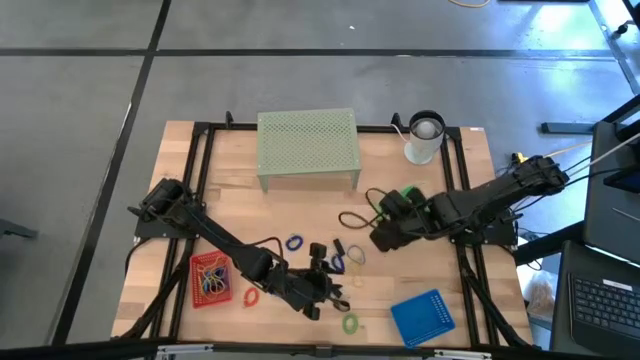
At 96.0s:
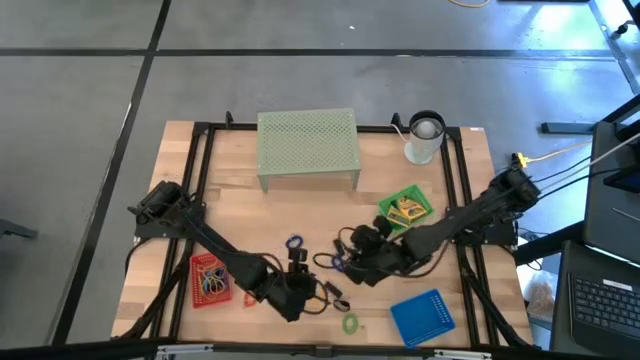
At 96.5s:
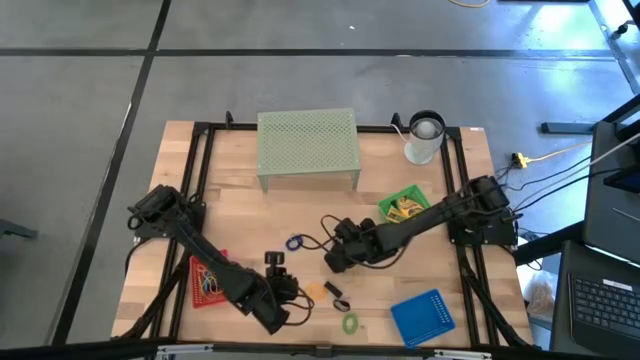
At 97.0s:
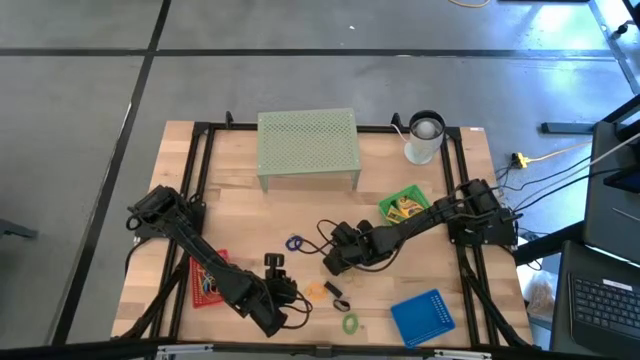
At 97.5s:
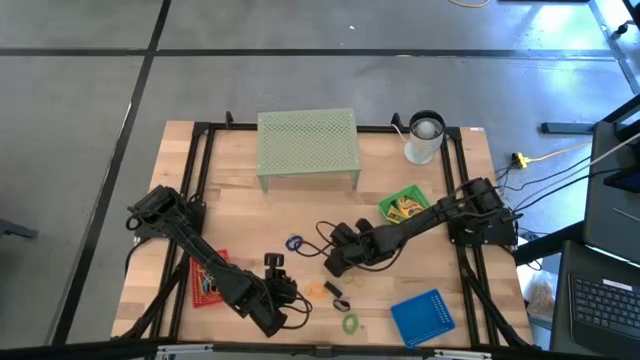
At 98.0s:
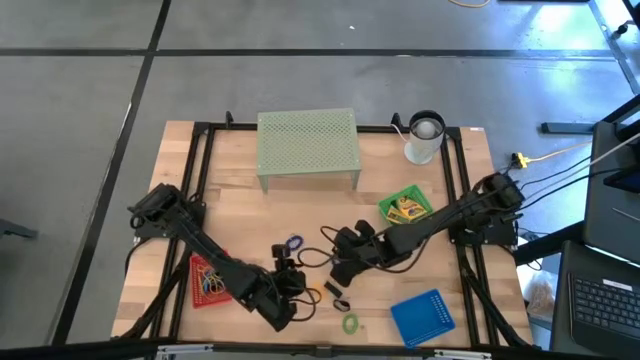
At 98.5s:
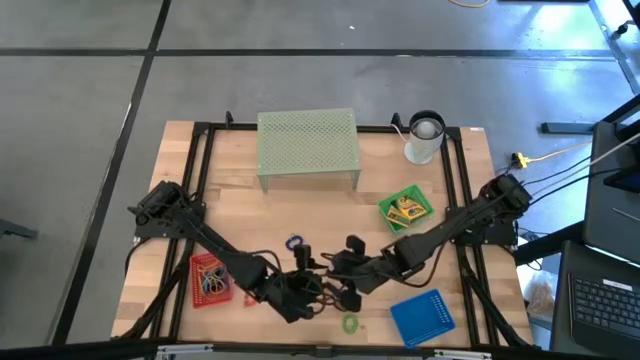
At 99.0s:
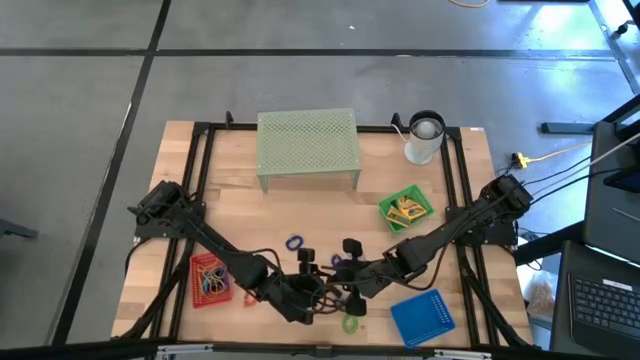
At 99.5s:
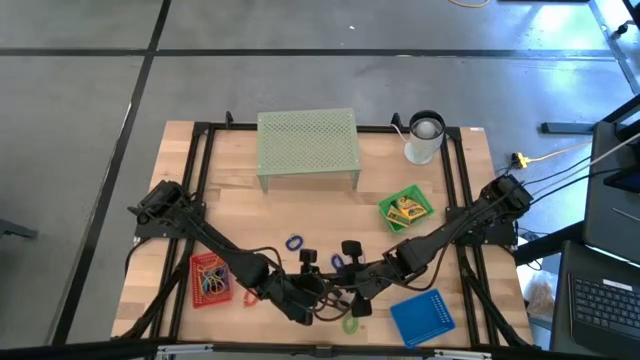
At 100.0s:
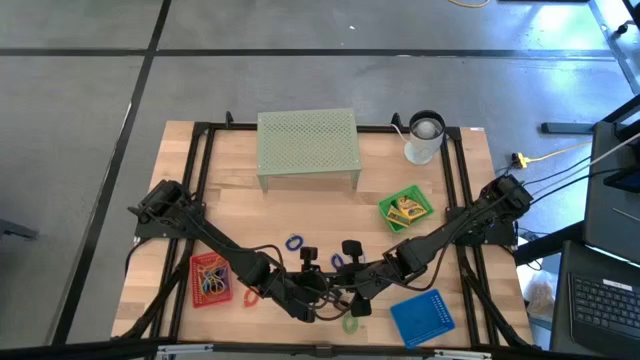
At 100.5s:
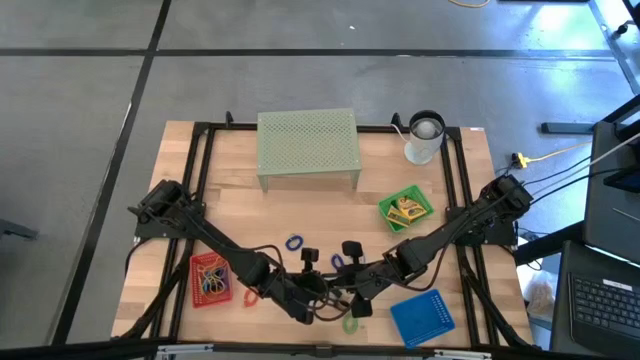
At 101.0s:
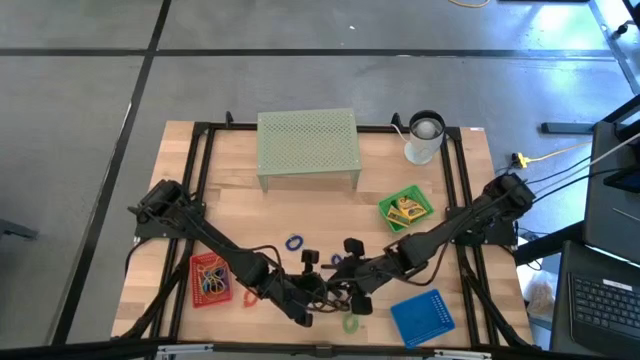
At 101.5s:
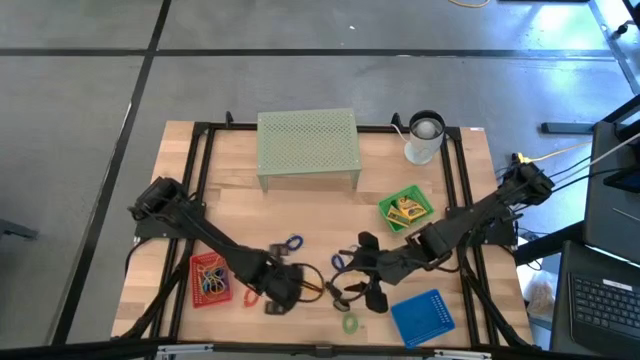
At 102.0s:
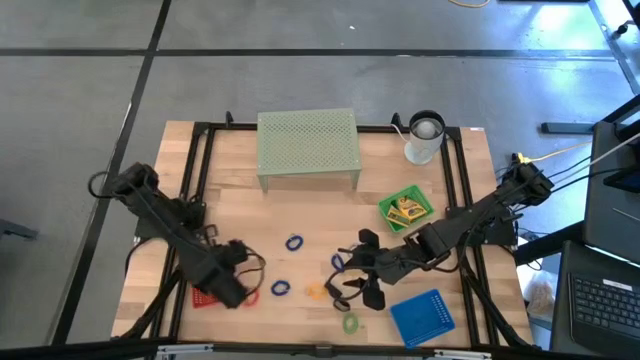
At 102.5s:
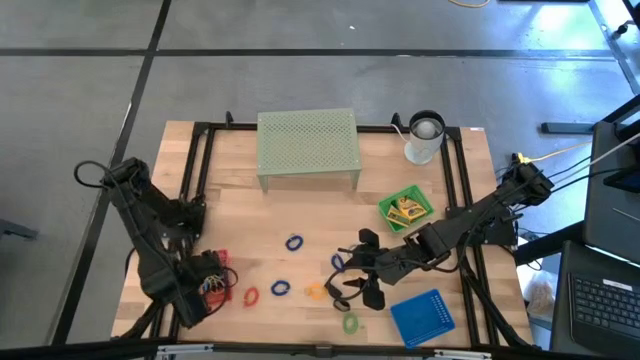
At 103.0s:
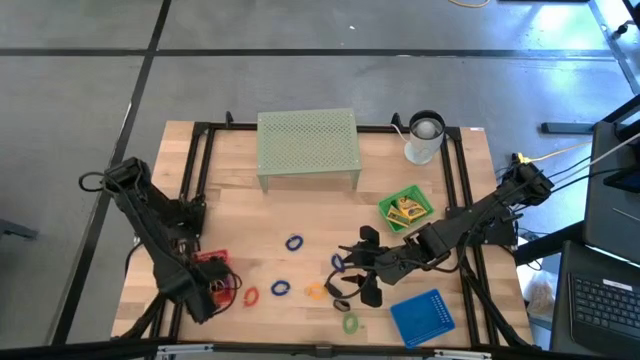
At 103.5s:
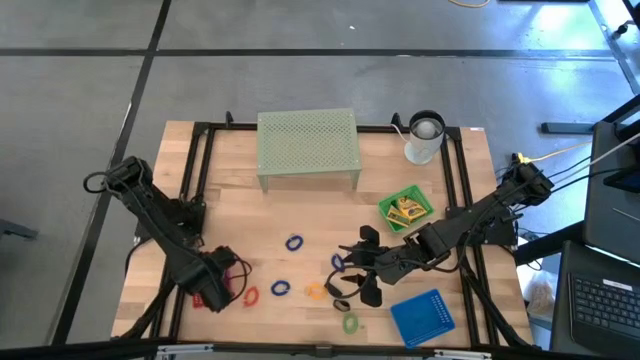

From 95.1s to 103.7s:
Task: Pick & Place Office Desk Supplies
Put the black rubber band into the red bin

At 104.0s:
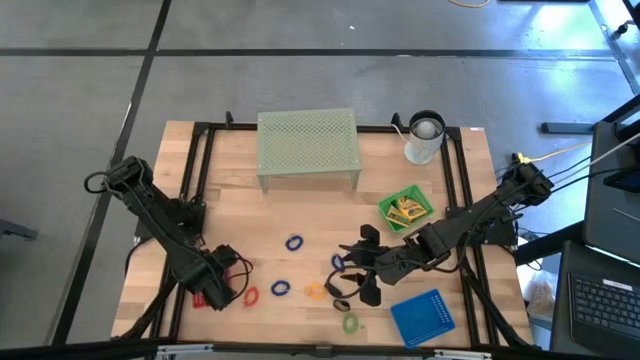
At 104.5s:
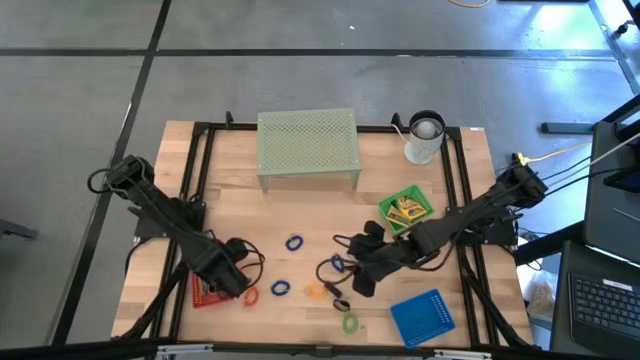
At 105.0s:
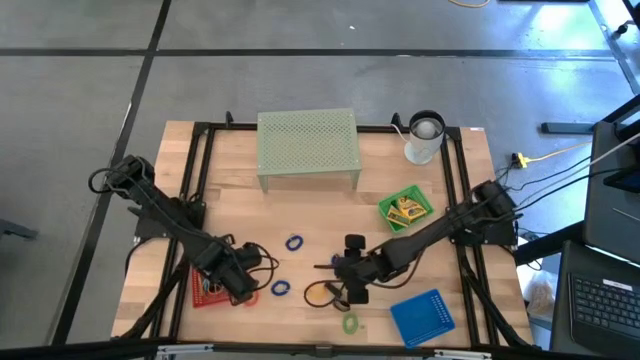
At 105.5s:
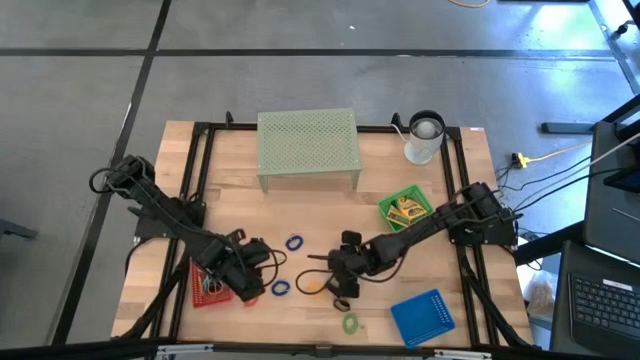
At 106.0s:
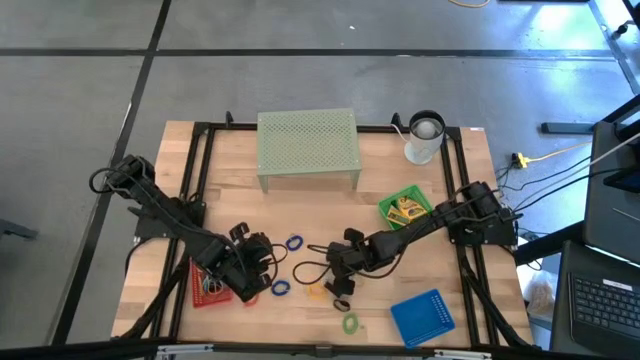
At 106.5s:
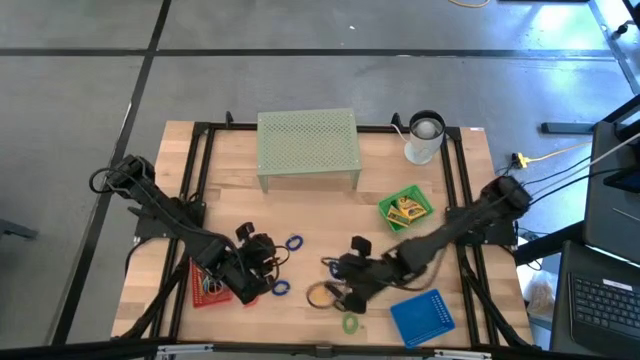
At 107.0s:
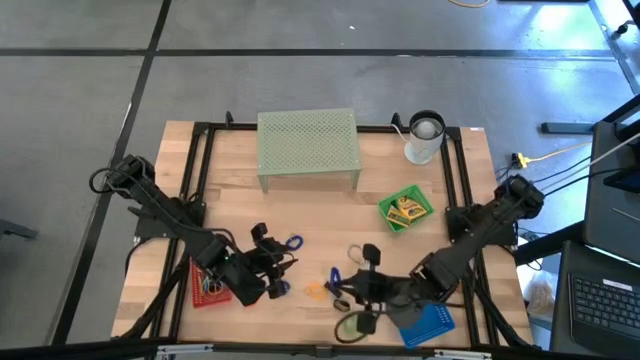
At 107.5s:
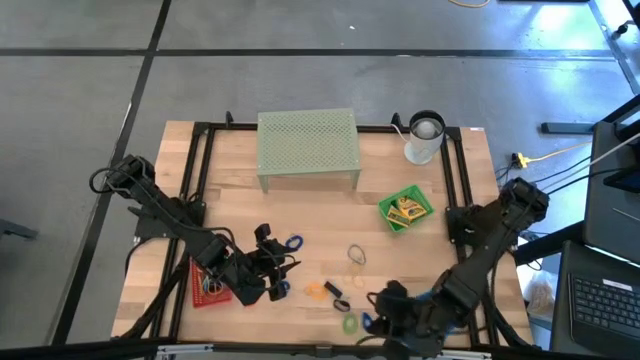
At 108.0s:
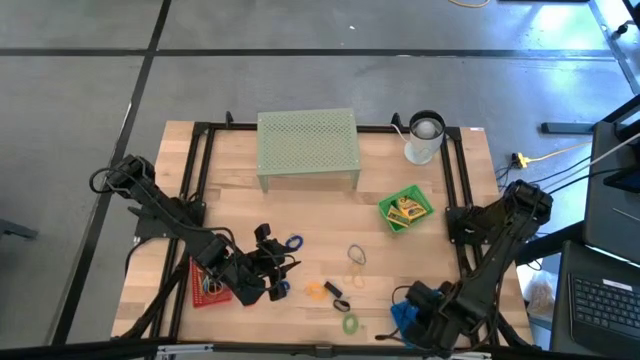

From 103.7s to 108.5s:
Put the blue spring rubber band into the blue bin

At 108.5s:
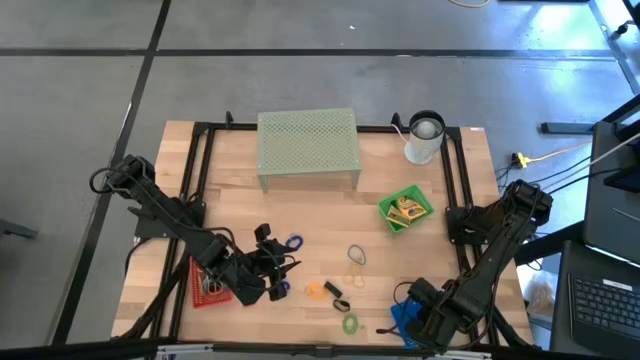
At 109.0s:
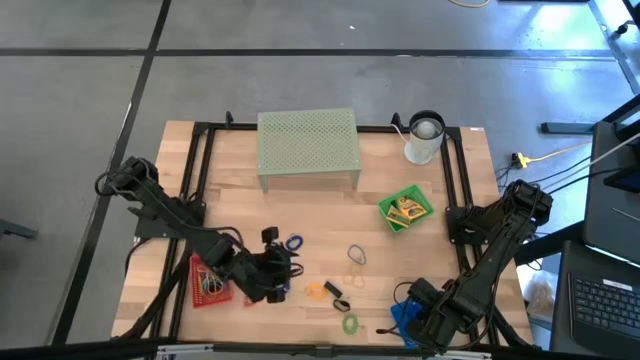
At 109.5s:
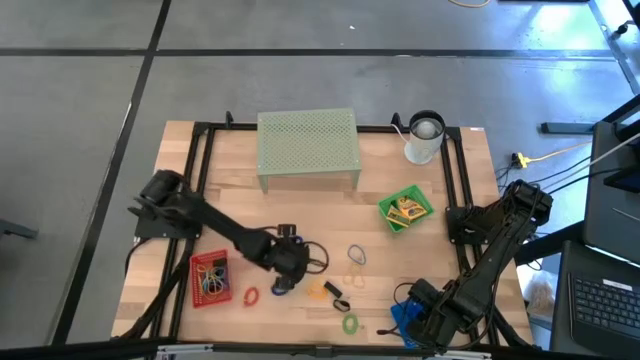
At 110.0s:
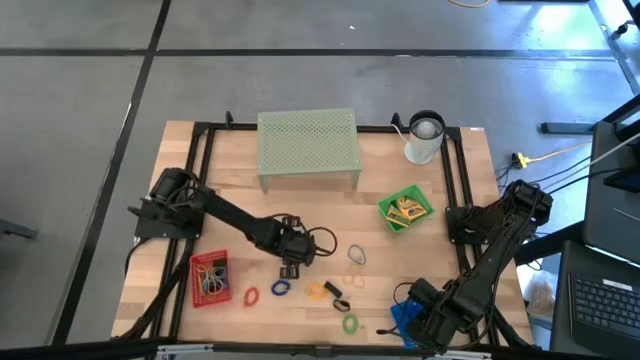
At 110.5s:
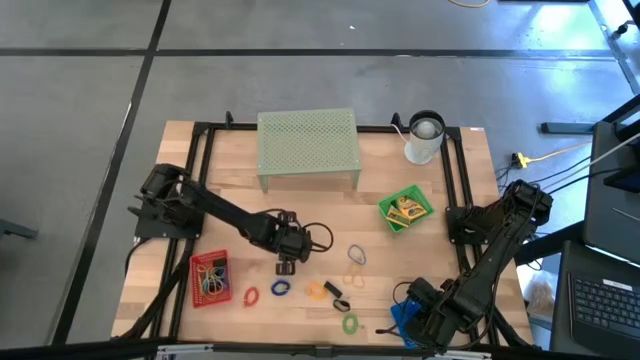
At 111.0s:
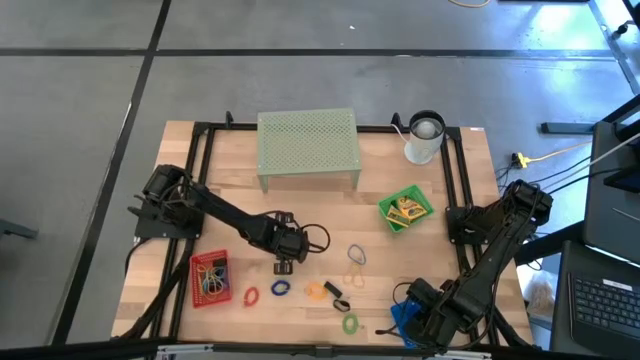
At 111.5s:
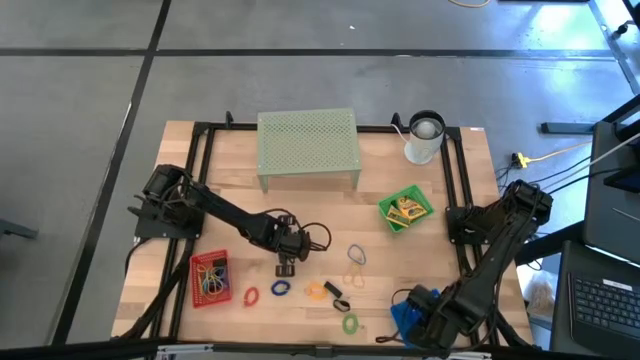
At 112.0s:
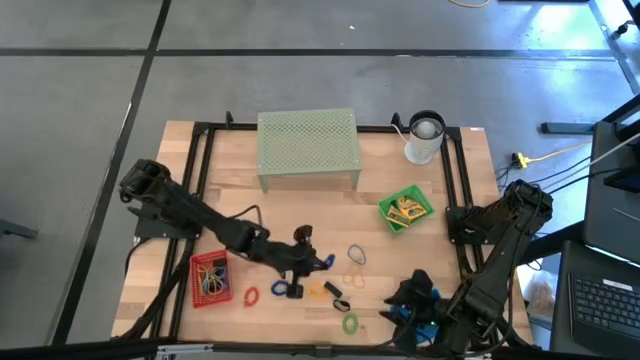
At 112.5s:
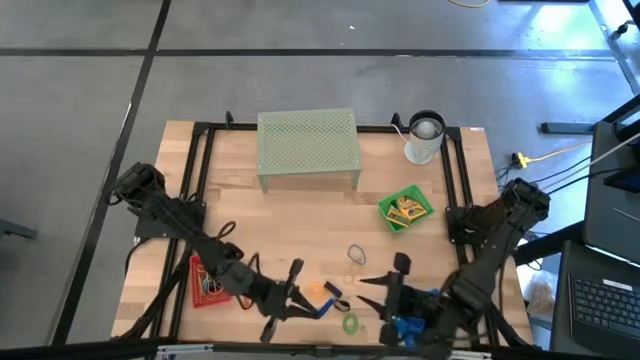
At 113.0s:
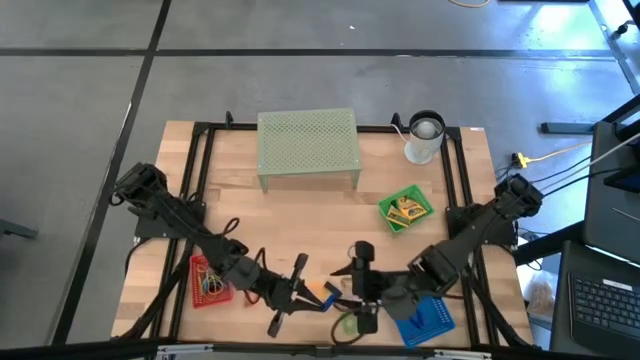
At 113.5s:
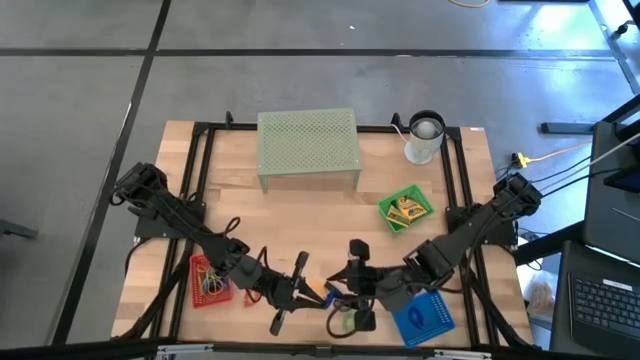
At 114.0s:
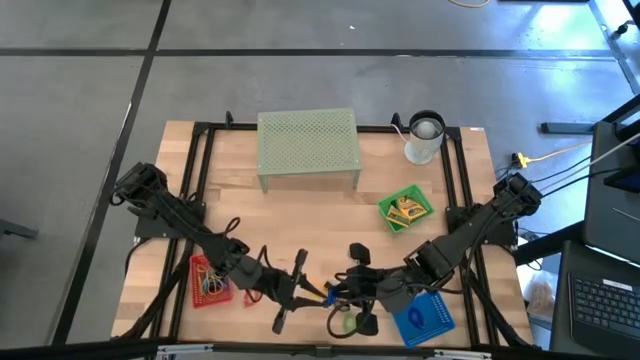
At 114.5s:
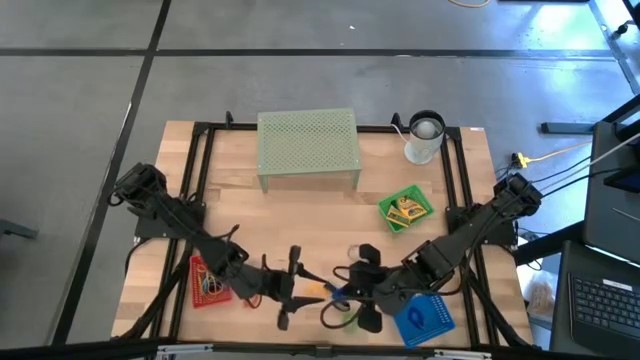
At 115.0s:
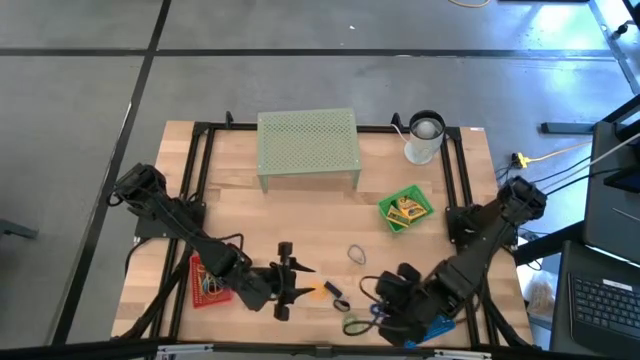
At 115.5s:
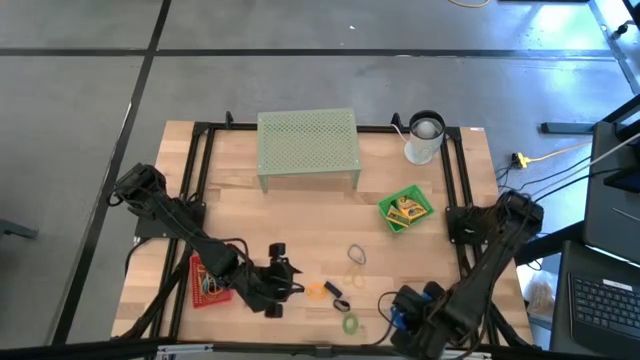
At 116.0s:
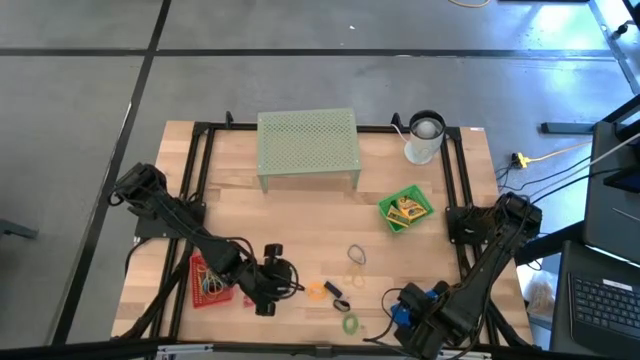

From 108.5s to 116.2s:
Put the blue spring rubber band into the blue bin
